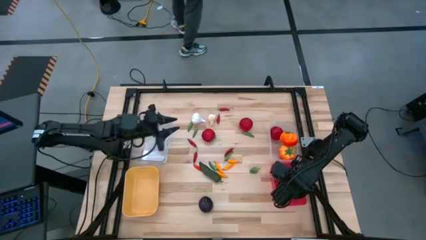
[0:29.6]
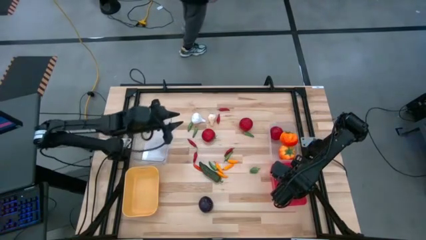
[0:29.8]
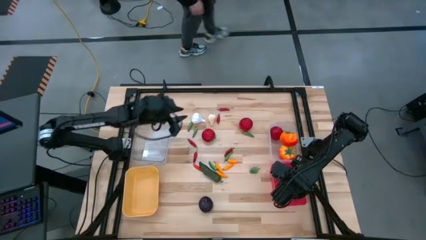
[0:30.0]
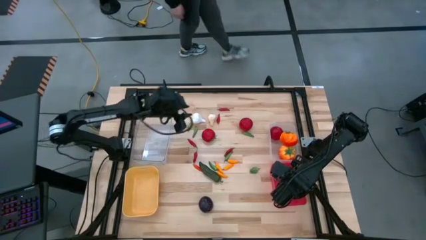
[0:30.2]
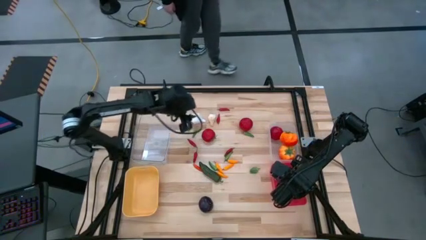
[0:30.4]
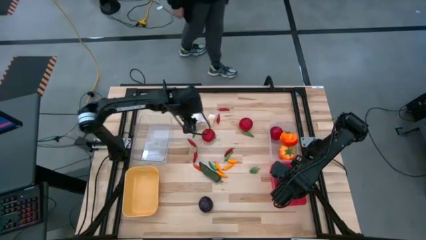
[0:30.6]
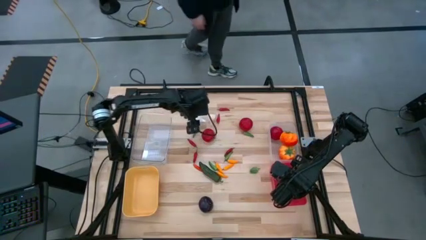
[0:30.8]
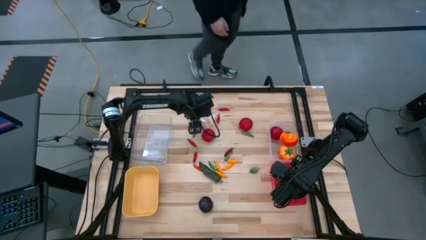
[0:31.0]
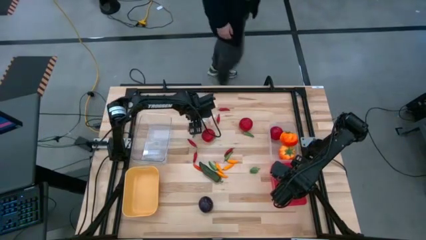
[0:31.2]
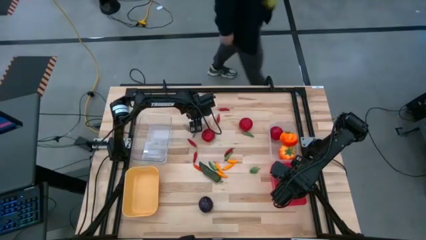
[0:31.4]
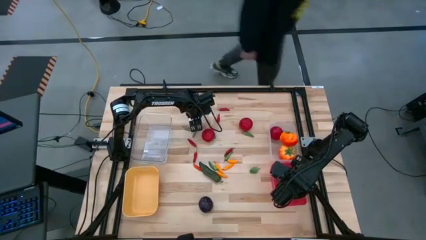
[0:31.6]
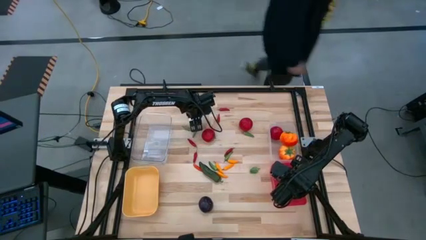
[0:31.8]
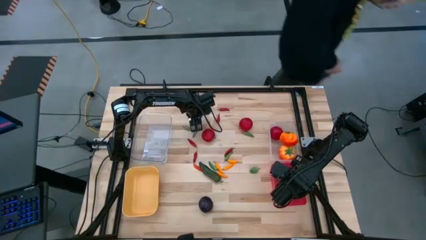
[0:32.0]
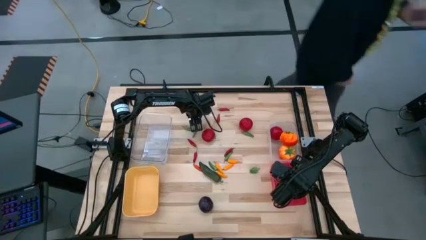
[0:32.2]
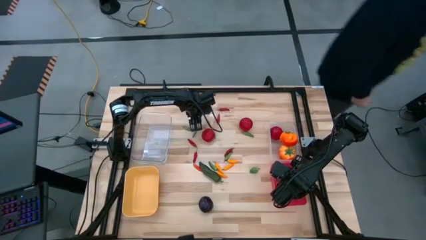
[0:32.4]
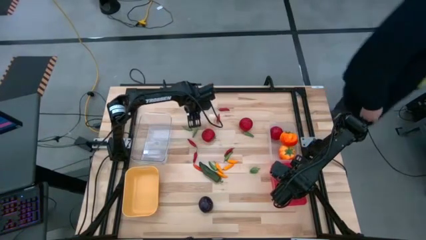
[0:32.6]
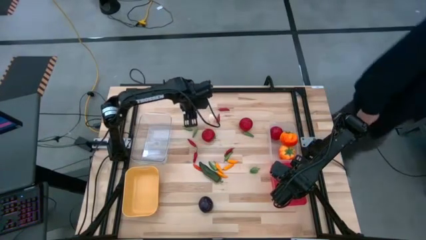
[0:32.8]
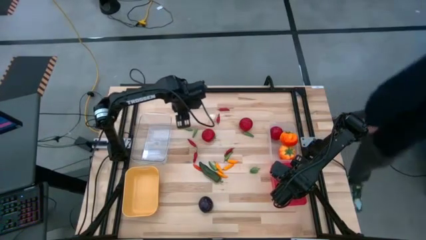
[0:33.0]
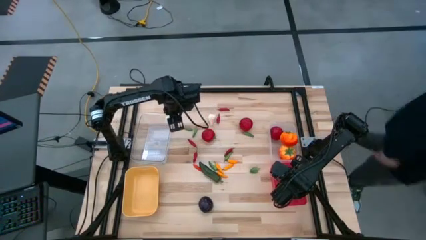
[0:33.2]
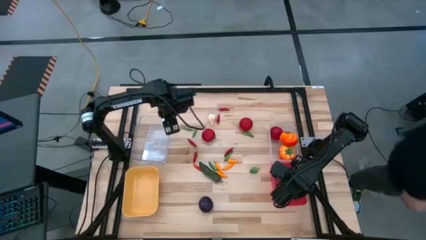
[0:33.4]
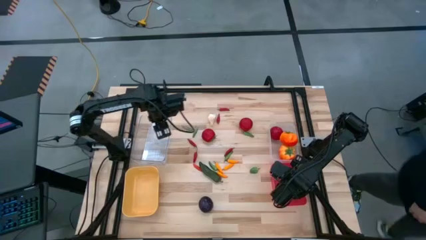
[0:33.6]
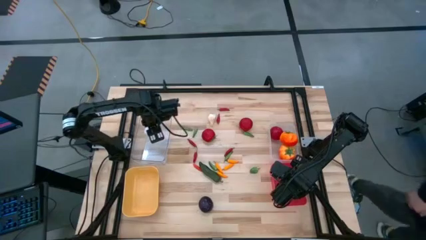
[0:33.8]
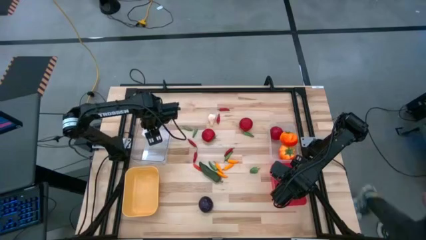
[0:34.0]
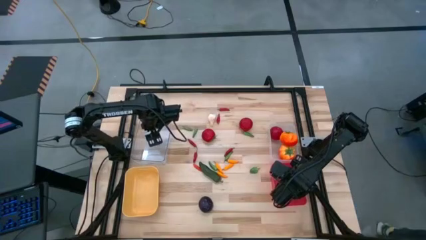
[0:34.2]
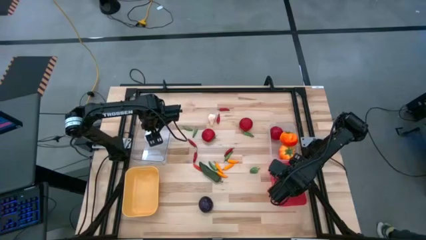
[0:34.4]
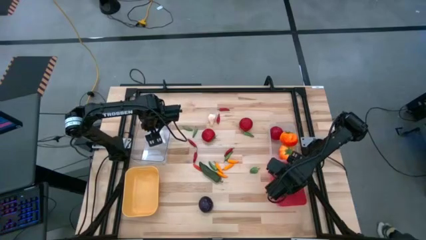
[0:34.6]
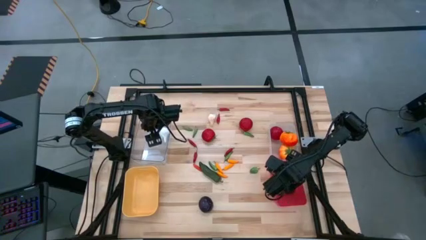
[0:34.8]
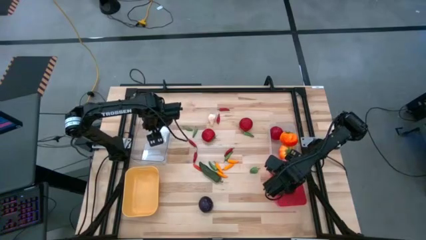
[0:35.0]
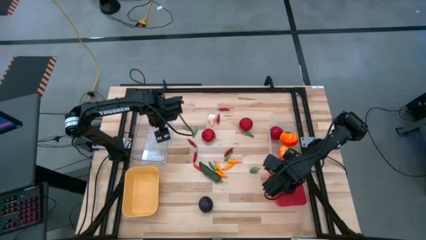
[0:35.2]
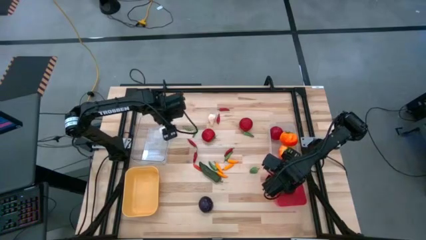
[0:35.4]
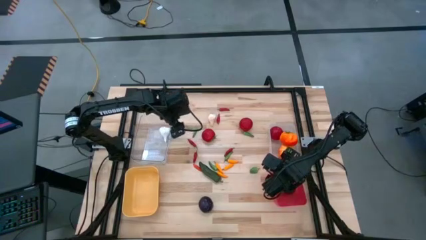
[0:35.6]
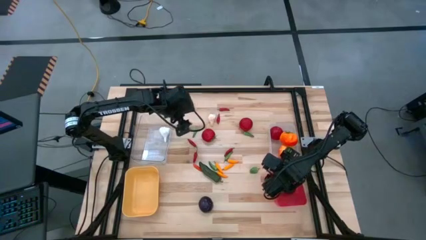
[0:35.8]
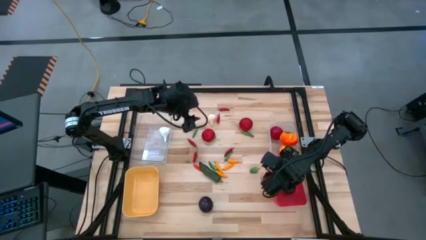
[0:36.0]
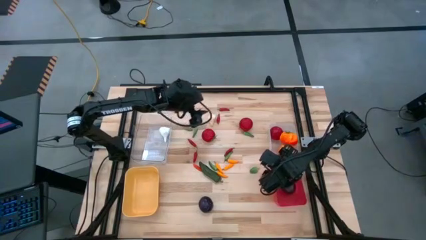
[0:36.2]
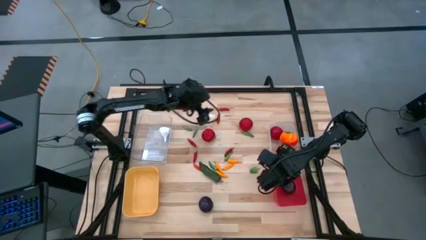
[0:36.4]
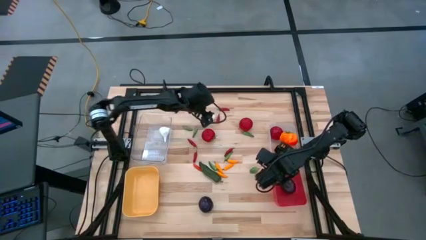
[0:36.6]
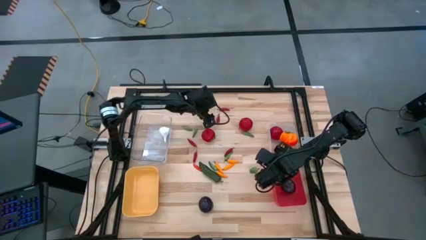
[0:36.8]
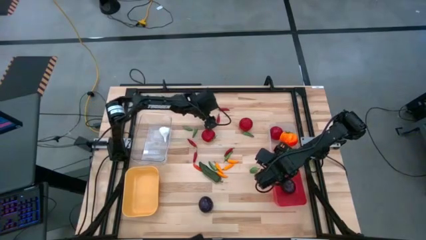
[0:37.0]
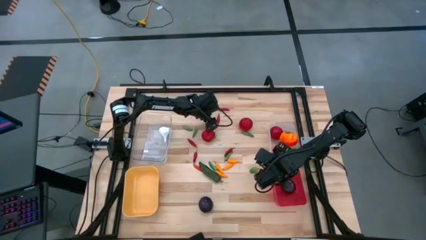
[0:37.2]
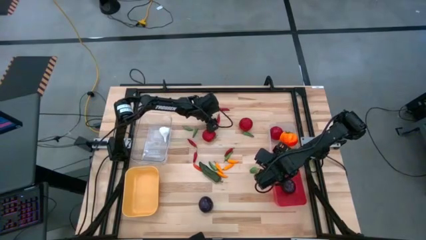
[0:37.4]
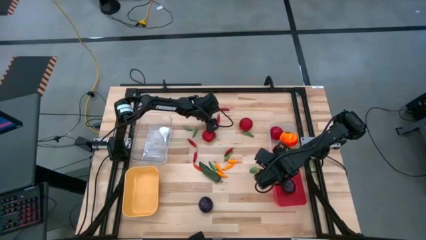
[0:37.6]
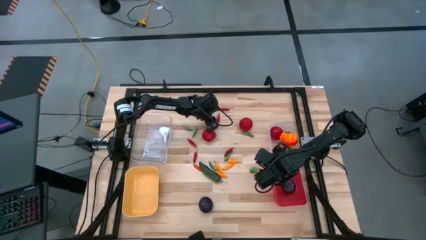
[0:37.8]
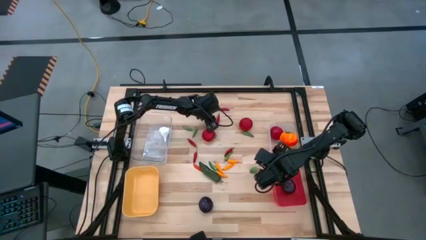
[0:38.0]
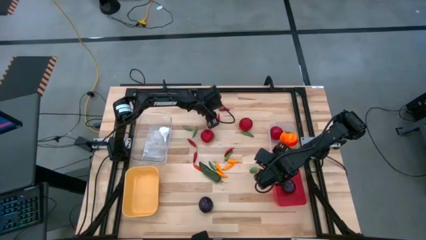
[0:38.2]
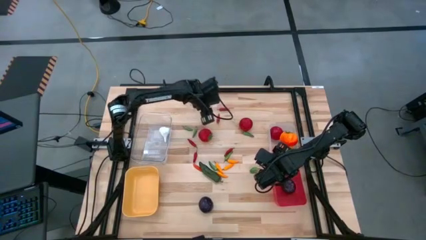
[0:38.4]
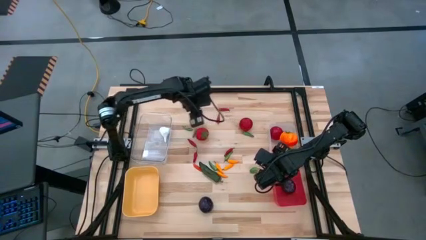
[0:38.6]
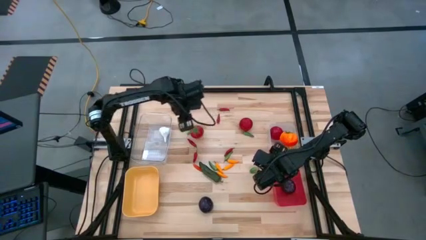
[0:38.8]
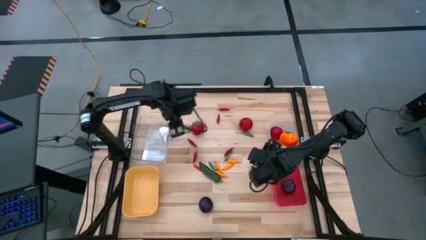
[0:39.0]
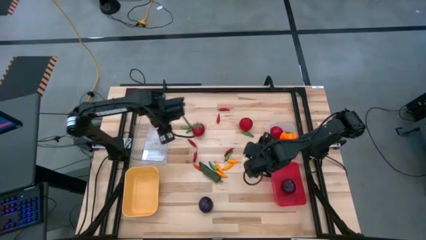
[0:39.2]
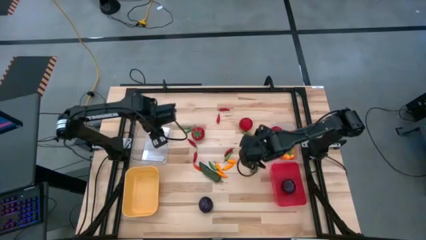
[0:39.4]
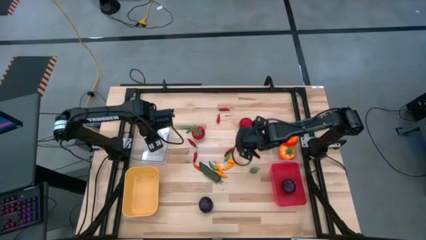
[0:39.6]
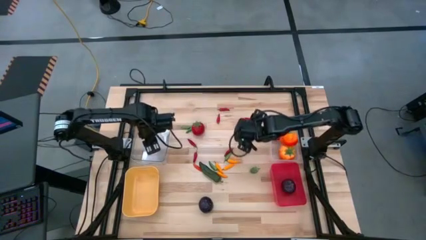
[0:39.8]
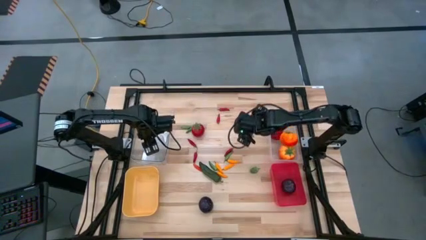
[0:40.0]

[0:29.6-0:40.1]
Task: Sort produce into baskets
Put the garlic into the left transparent bin

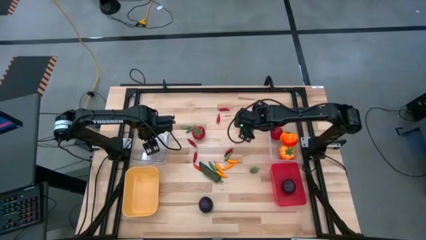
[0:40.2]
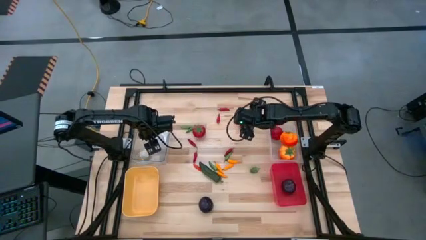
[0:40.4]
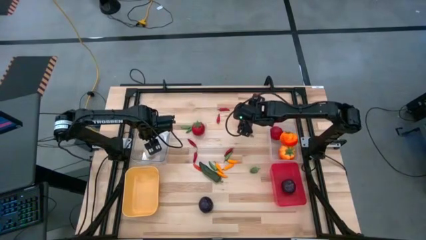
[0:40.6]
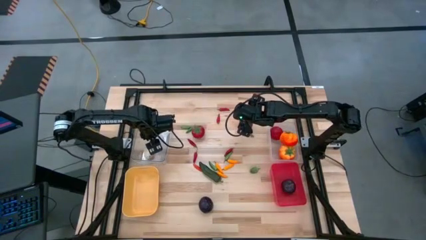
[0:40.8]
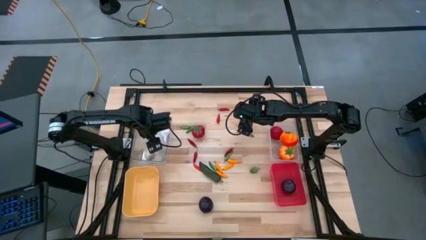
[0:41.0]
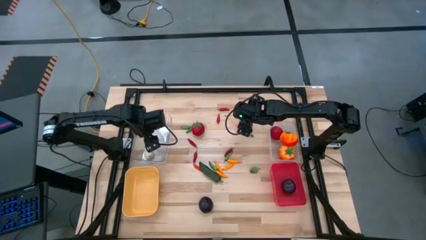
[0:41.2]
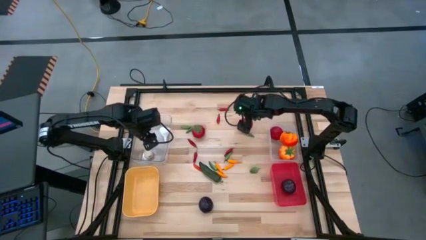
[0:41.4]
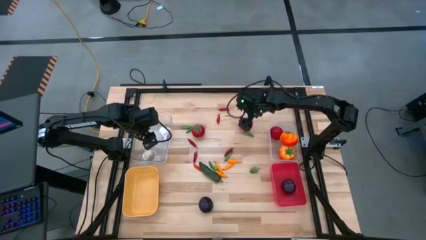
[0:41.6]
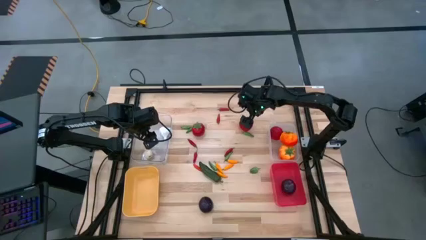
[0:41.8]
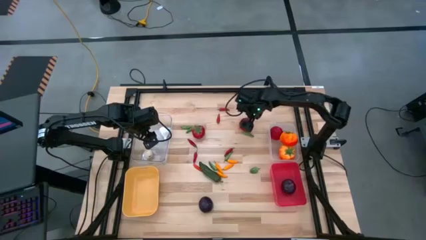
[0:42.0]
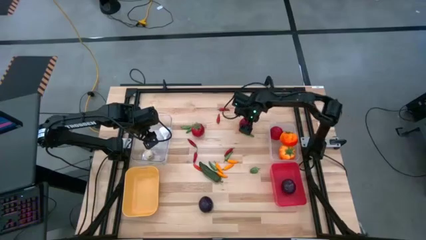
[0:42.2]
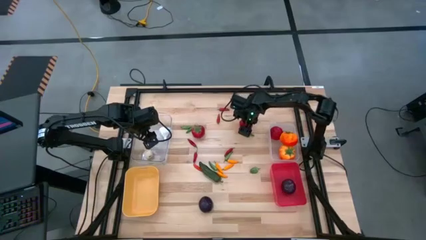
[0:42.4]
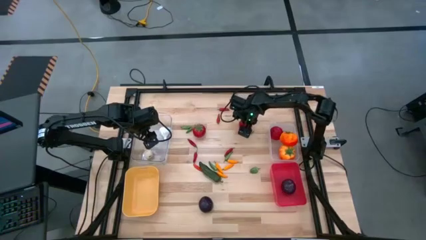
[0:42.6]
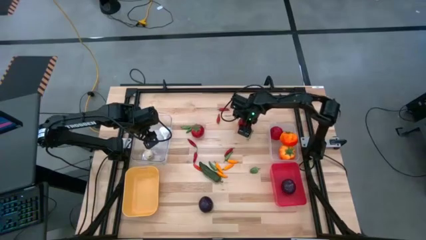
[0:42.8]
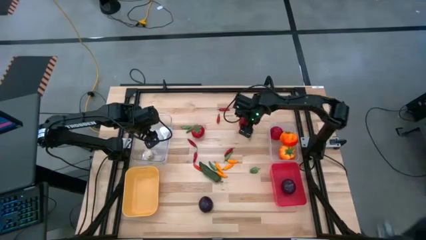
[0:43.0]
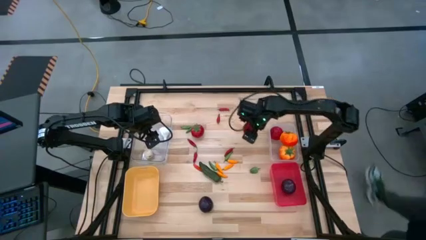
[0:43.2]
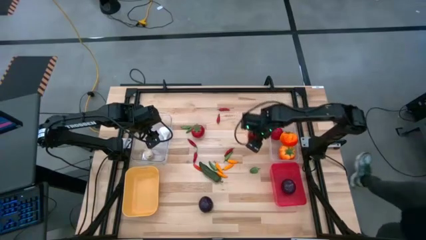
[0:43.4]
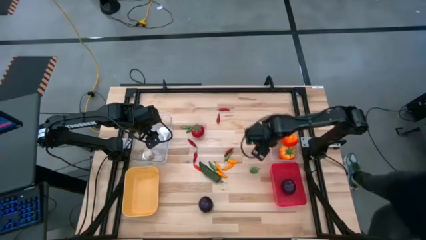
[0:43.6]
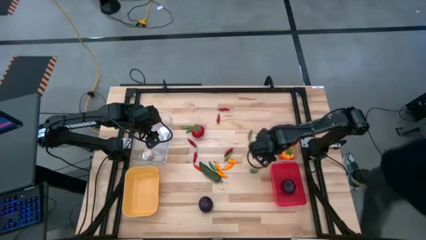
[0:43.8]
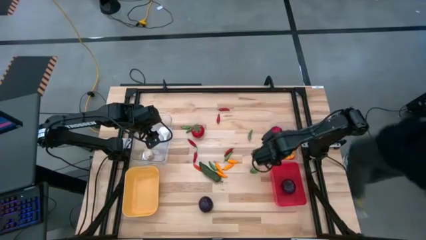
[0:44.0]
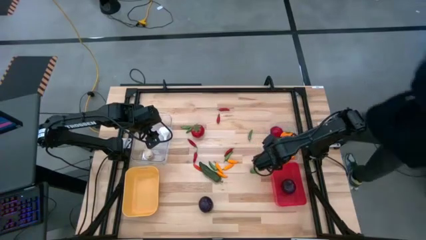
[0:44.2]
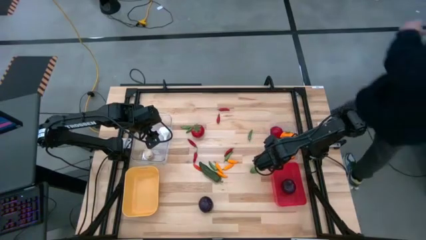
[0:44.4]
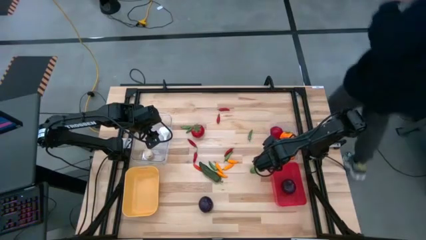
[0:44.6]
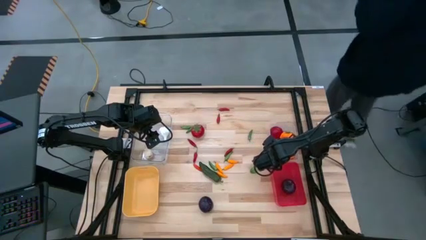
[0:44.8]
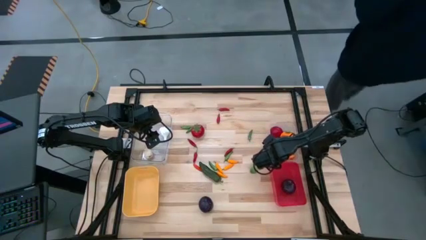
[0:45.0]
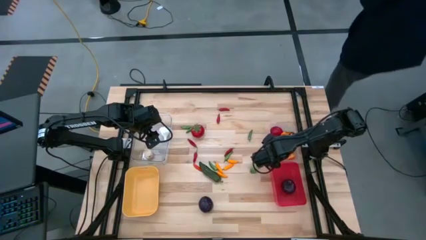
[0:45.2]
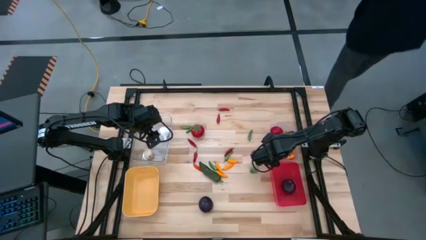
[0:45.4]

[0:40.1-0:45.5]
Put the red tomato into the right transparent bin

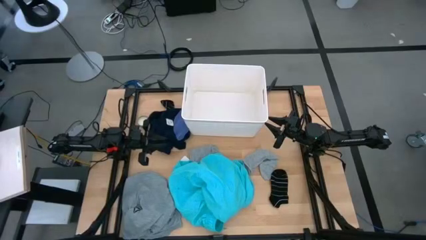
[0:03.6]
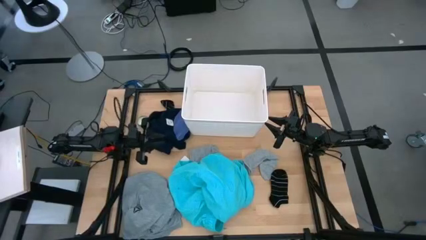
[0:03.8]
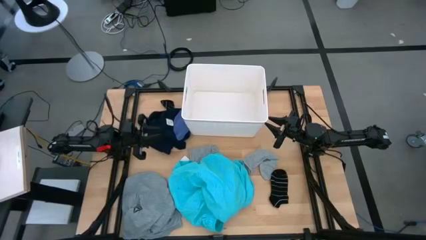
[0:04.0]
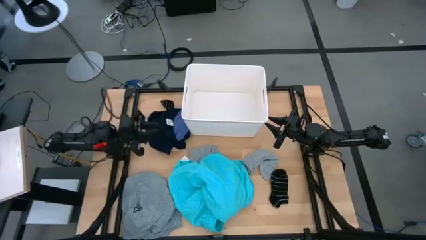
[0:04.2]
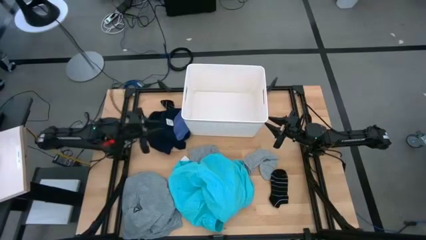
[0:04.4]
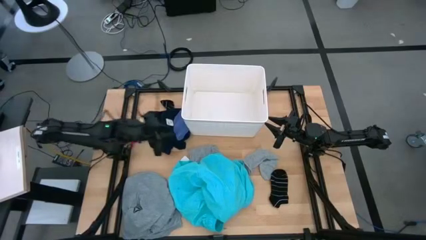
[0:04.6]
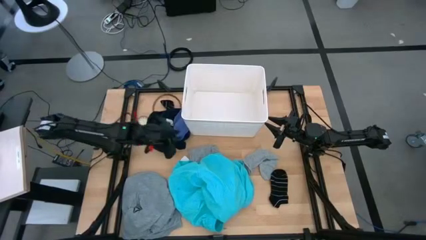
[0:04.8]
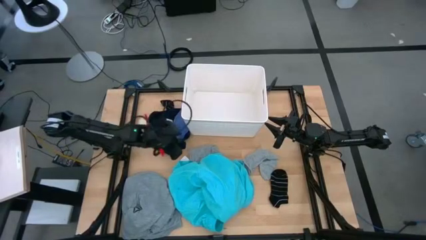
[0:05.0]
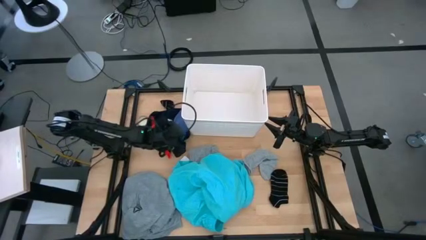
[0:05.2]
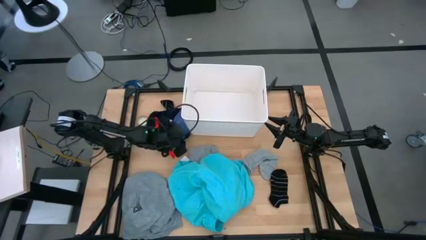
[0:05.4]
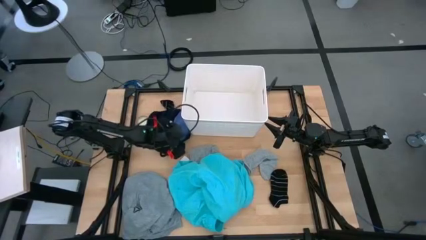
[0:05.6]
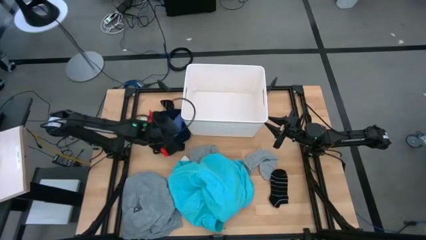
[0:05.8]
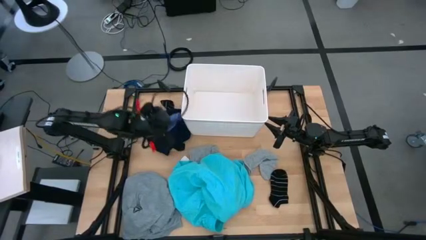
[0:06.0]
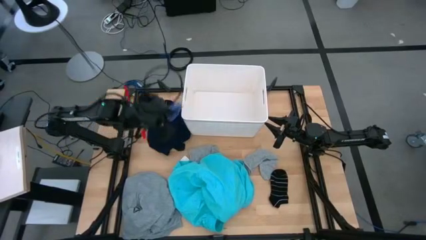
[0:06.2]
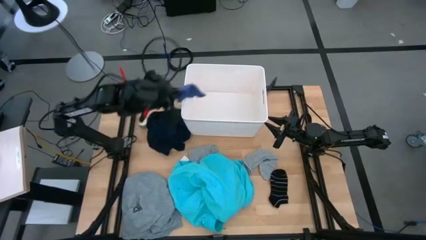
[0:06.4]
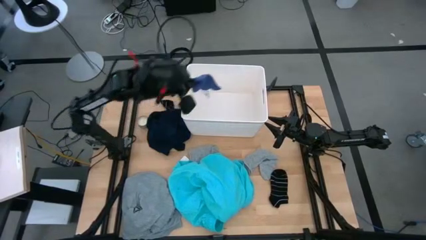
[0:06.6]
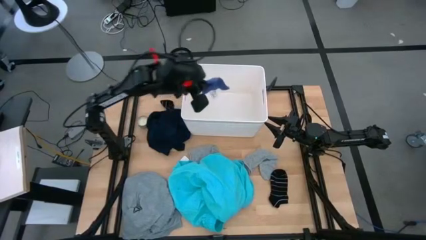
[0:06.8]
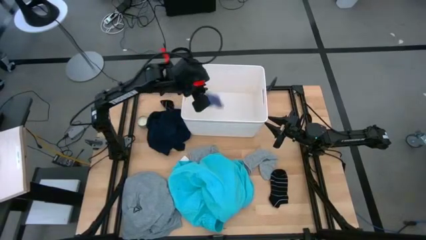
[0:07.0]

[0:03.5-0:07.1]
Task: Sort clothes
Put the top blue sock into the white laundry bin
